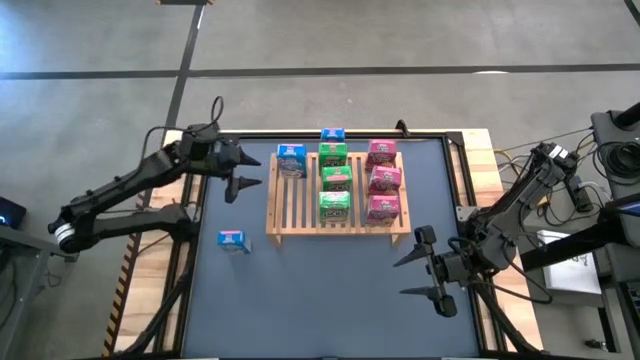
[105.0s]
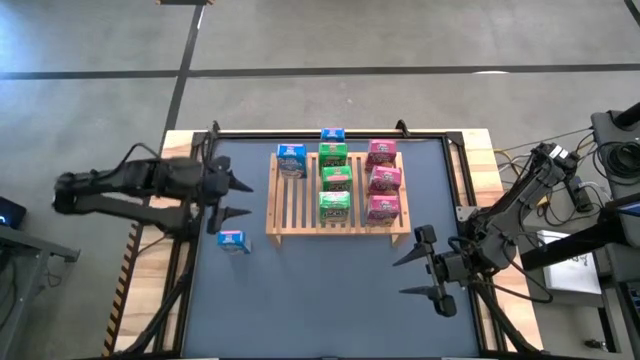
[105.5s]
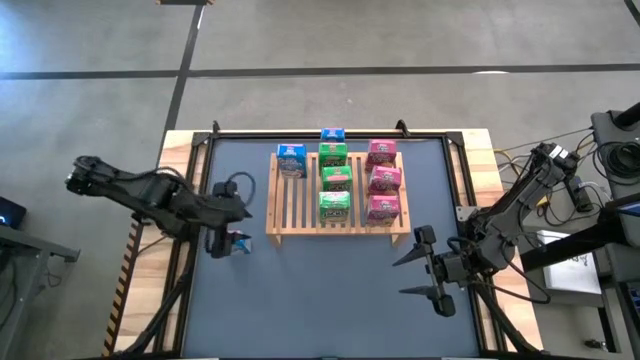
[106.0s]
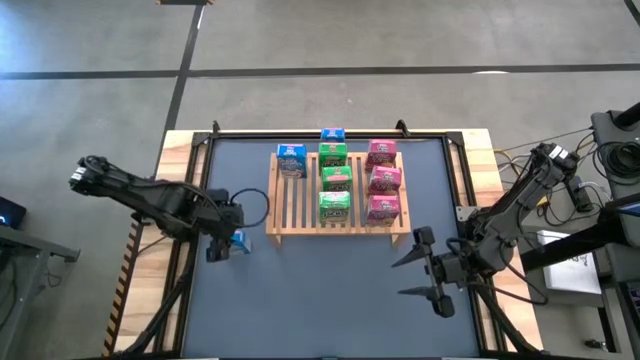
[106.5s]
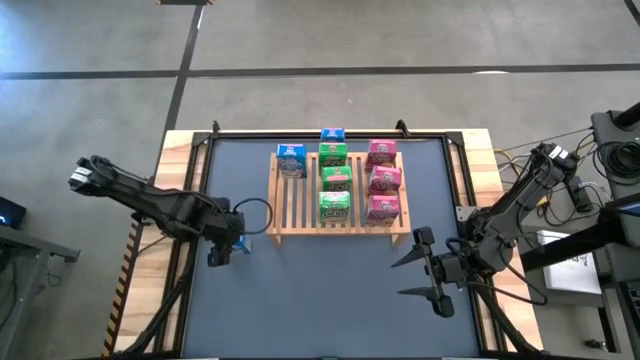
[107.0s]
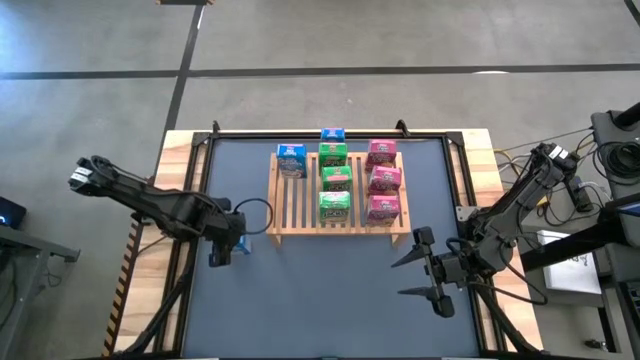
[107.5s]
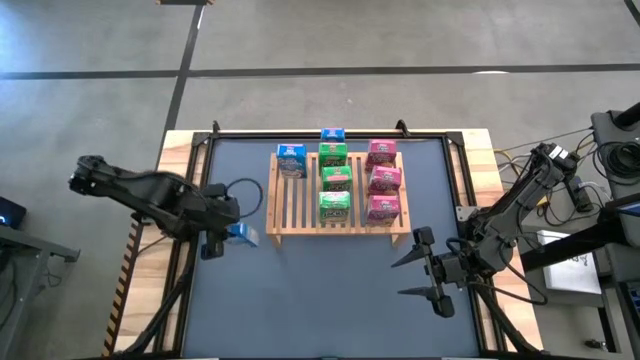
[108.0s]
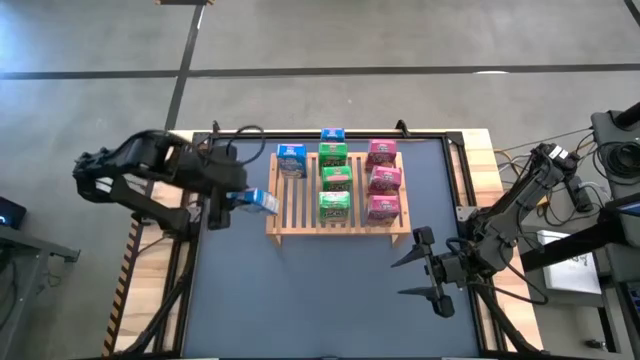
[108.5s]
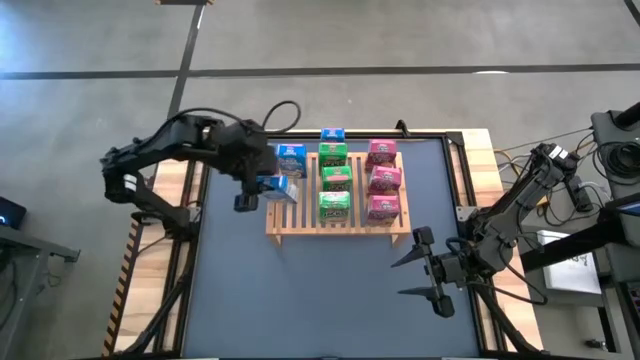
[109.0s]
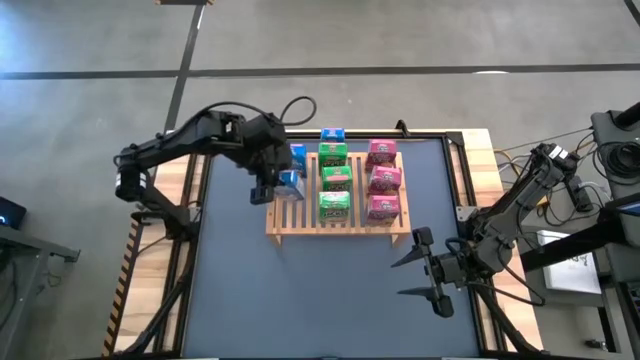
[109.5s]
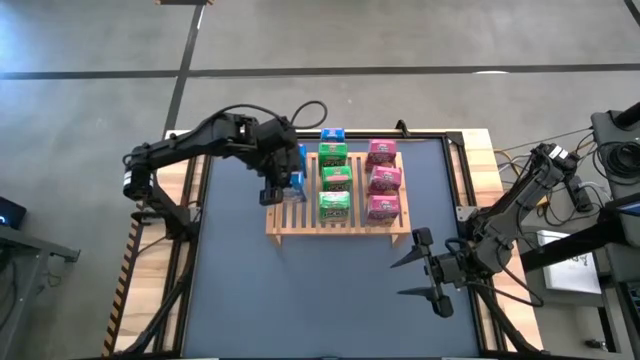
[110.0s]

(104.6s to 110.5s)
Task: Stack cereal on shelf
Put the bottom blue cereal box on the shelf aligned with the other blue cereal box

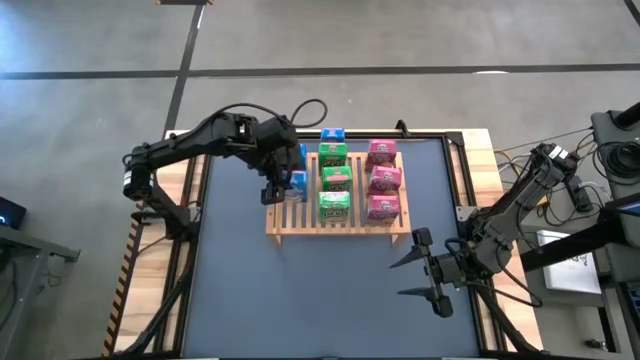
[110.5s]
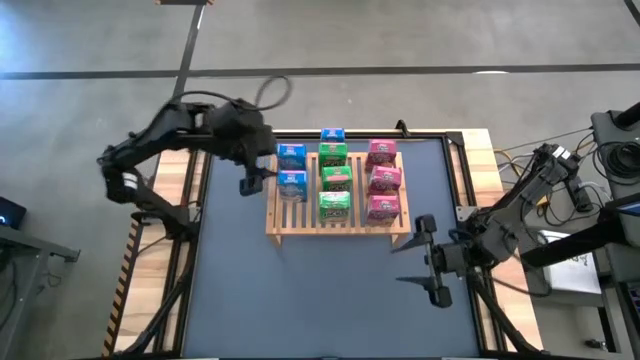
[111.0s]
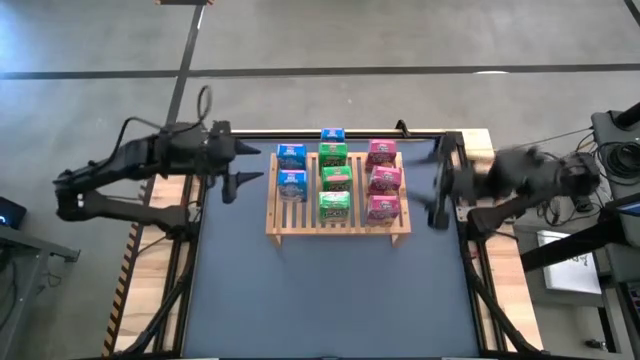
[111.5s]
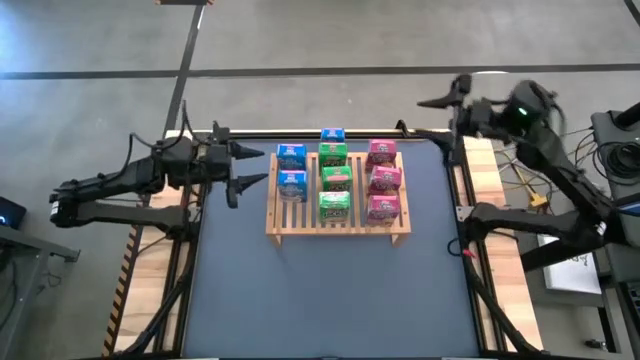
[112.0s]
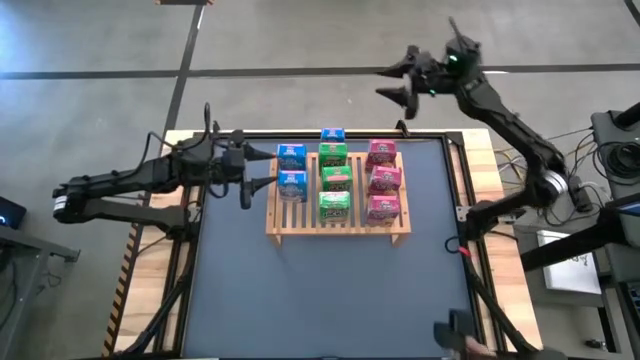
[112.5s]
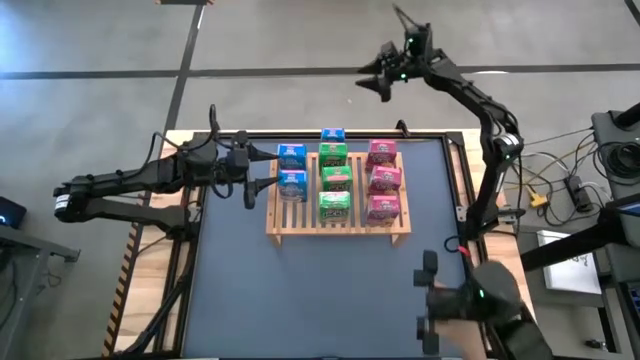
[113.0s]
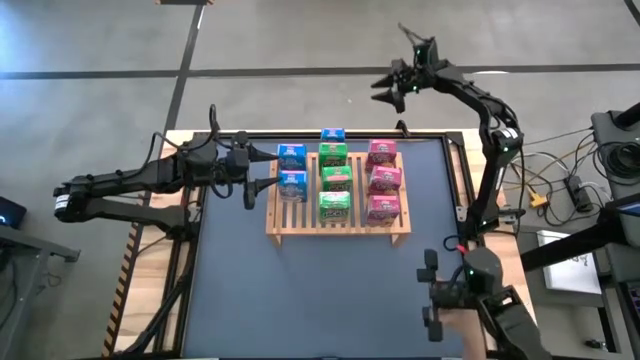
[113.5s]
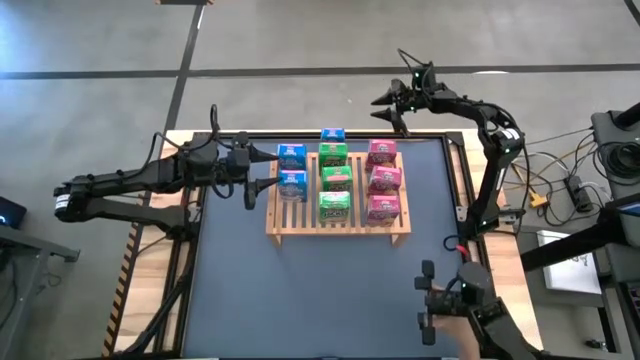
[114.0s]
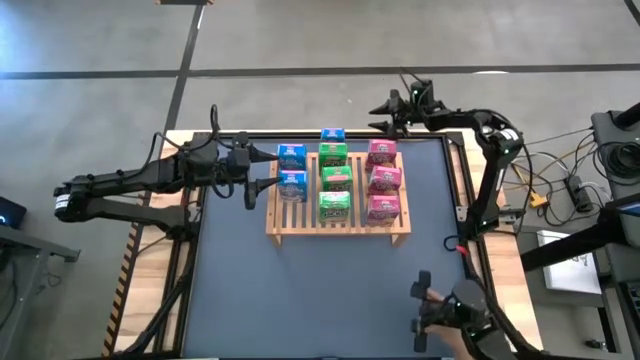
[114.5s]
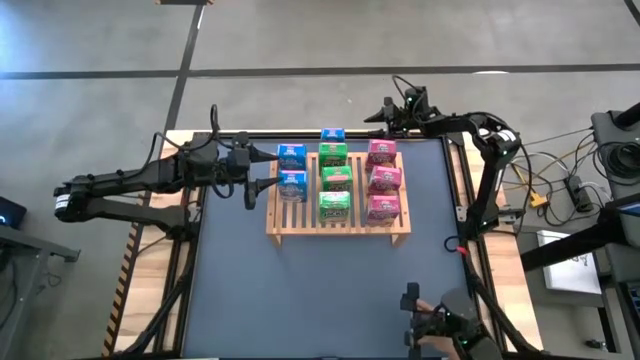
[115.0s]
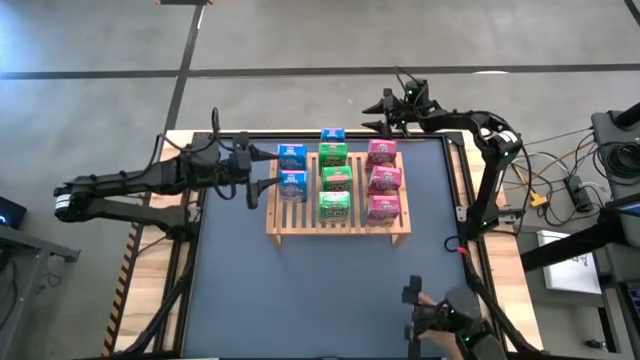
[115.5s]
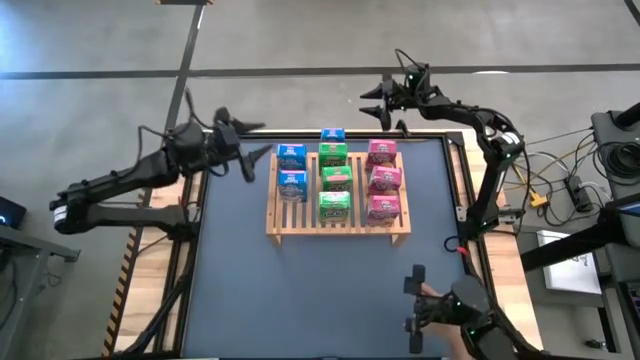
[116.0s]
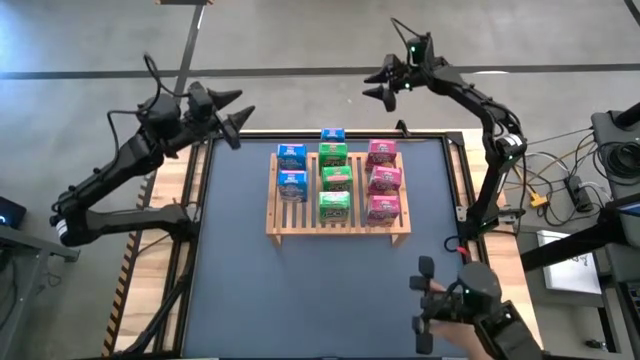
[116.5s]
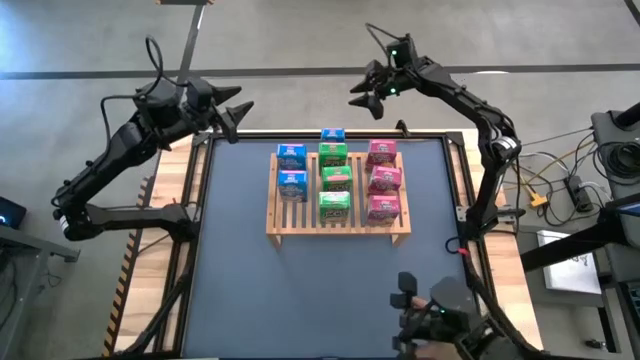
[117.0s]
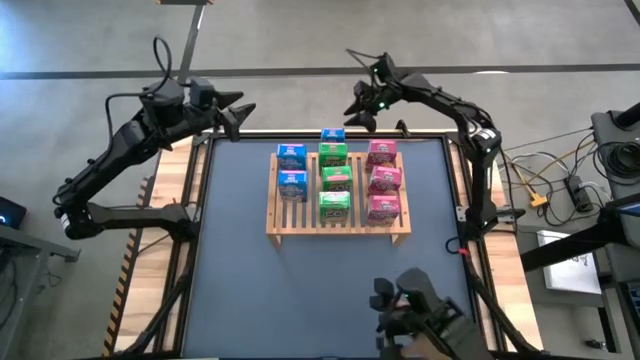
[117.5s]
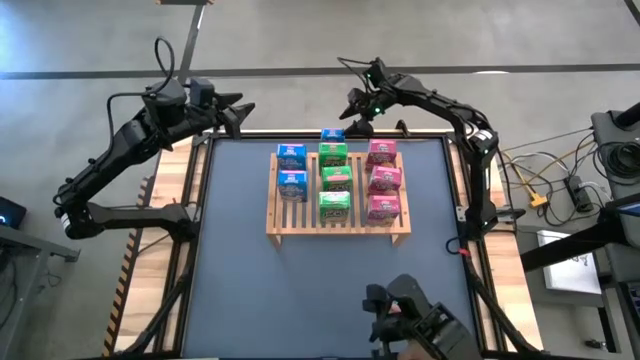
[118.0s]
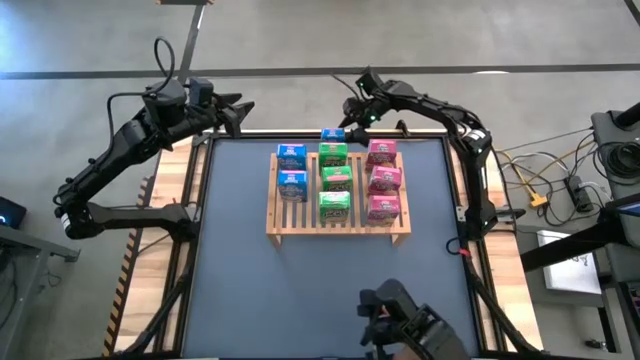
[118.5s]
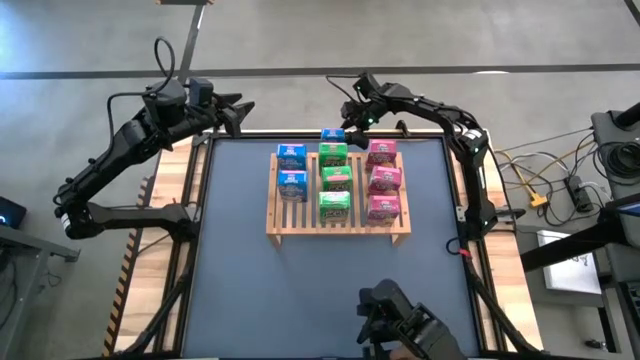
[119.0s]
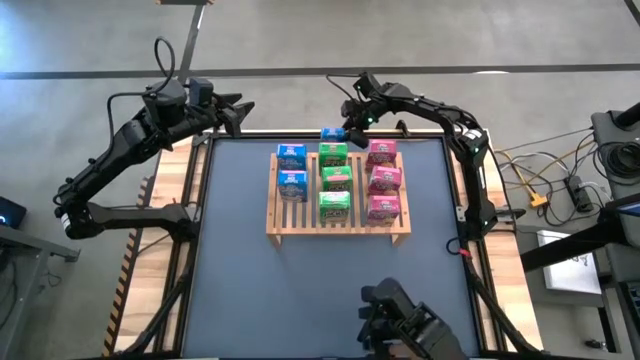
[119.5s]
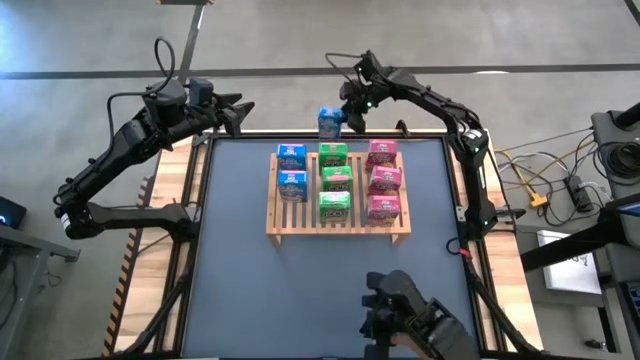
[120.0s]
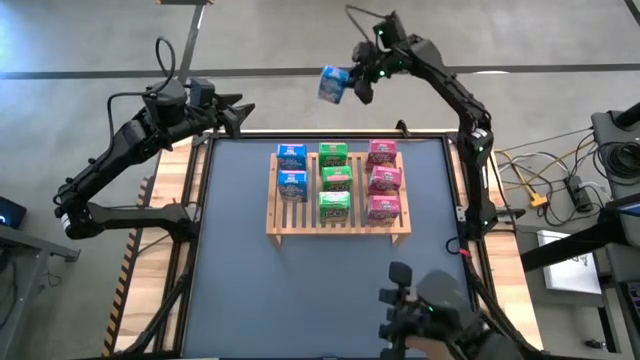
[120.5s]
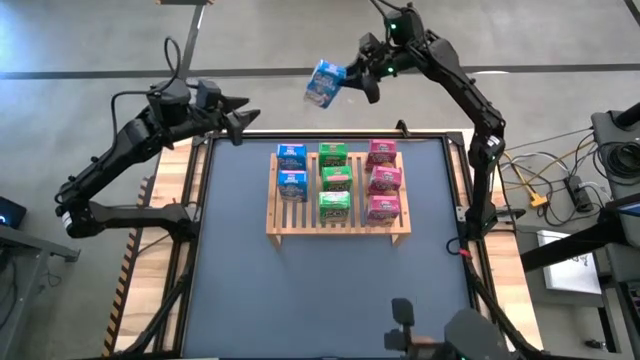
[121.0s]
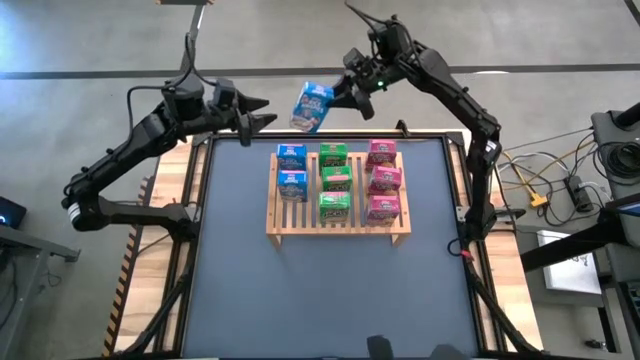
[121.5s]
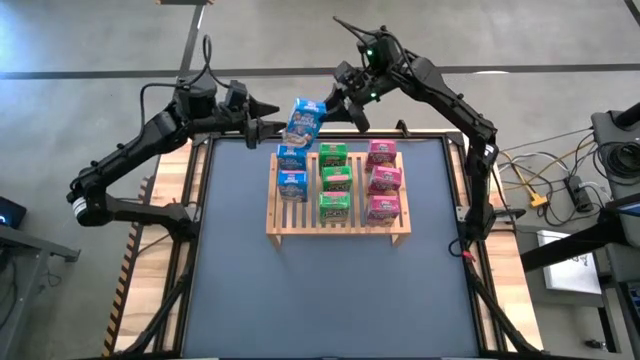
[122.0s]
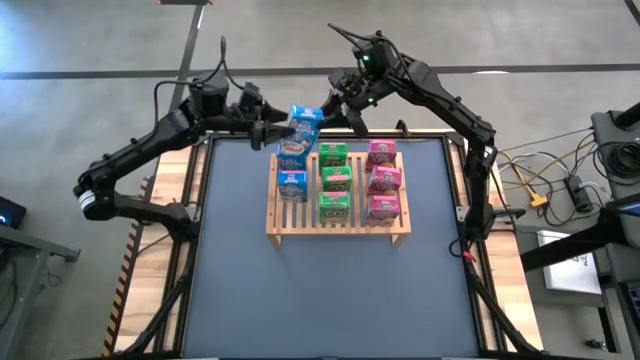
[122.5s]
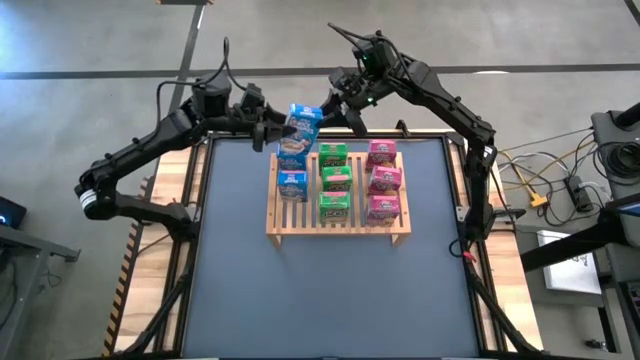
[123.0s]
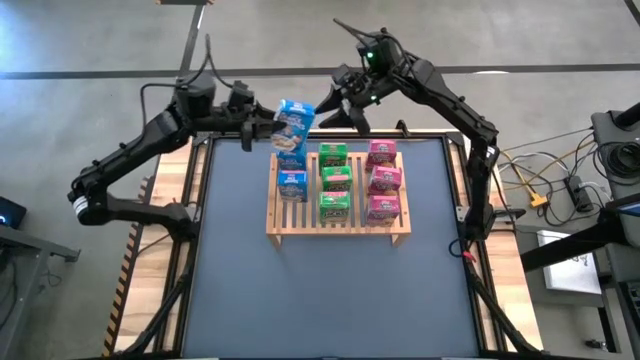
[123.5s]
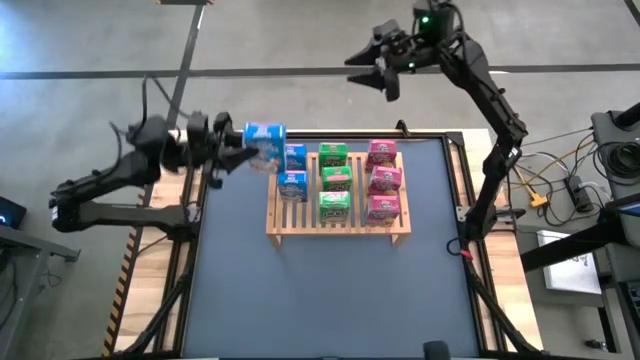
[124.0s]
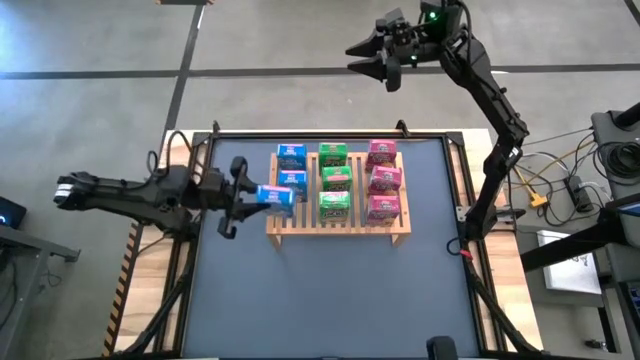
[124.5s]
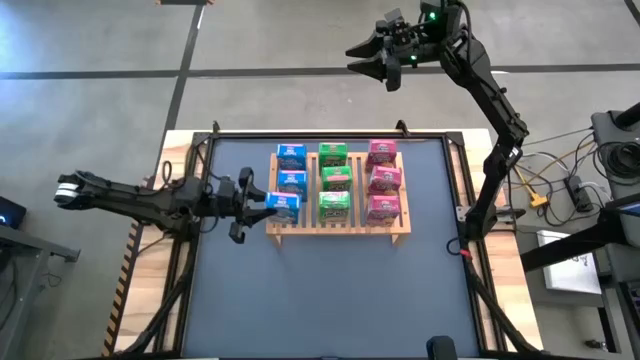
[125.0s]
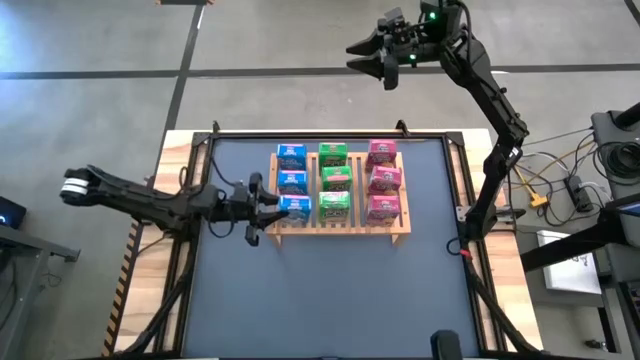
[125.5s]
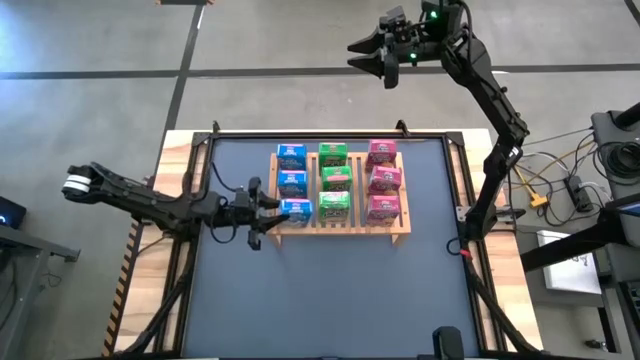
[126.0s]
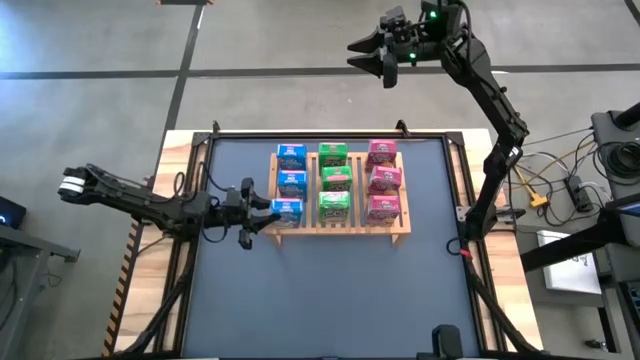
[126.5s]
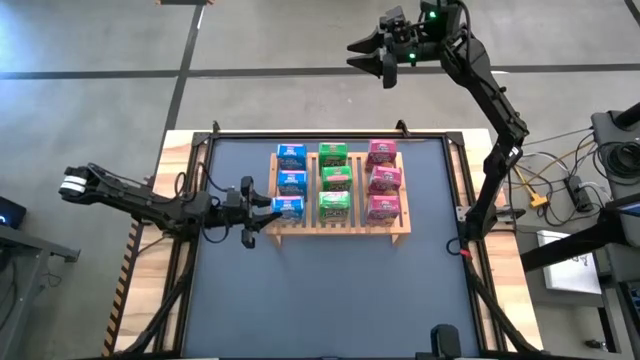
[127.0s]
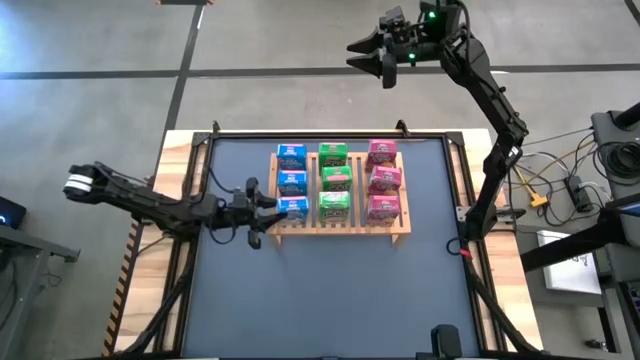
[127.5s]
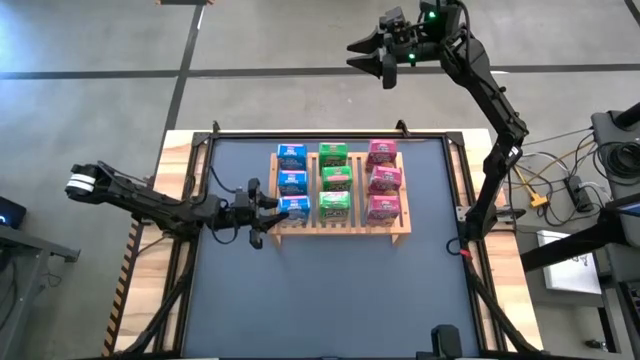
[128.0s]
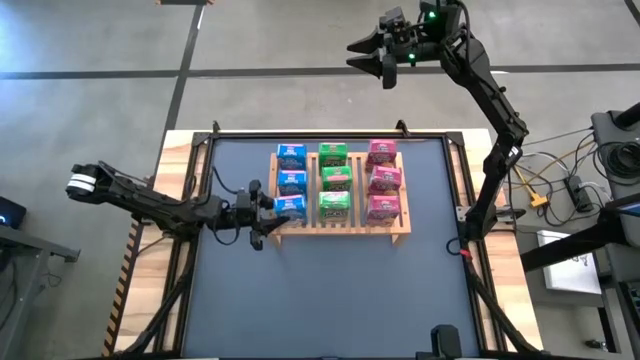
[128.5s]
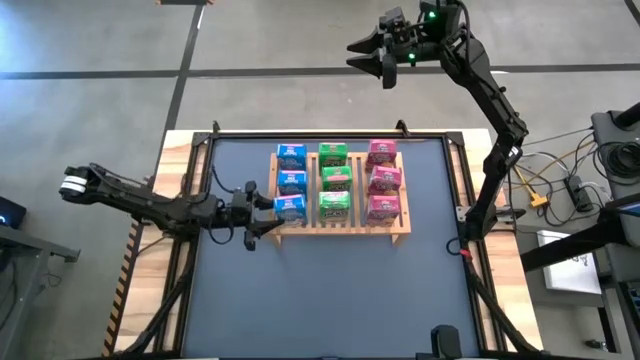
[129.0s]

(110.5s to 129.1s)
Put the blue cereal box on the shelf aligned with the other blue cereal boxes
